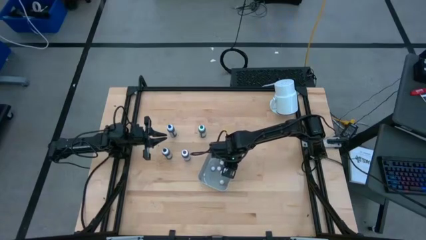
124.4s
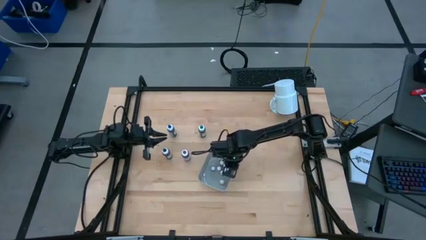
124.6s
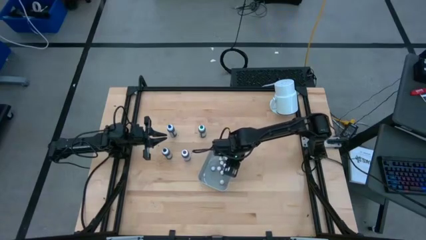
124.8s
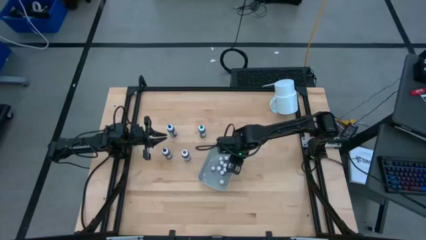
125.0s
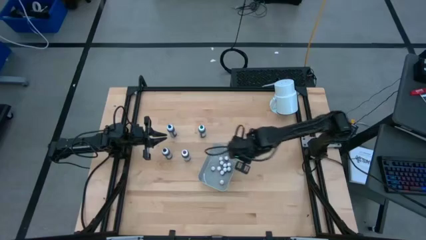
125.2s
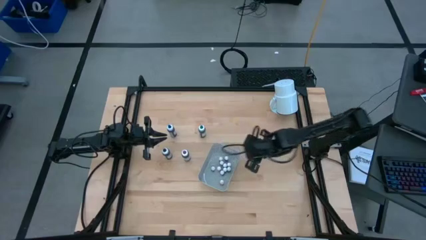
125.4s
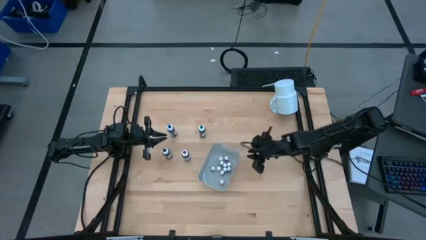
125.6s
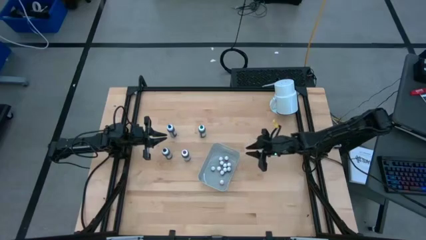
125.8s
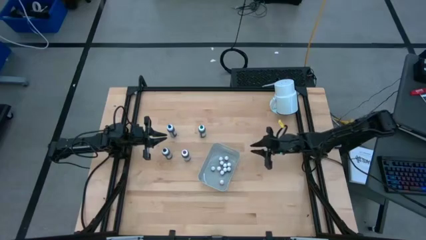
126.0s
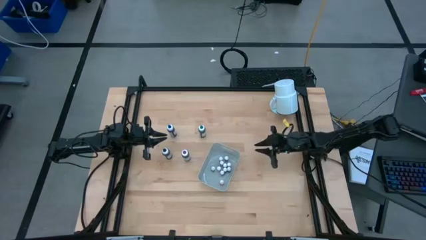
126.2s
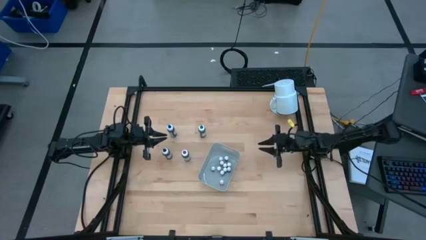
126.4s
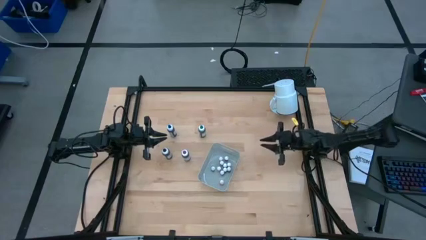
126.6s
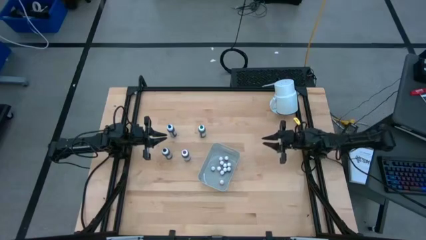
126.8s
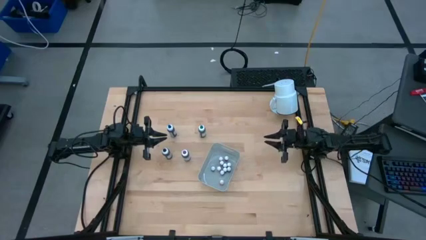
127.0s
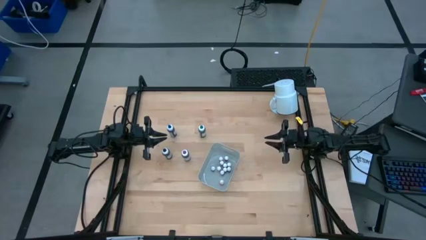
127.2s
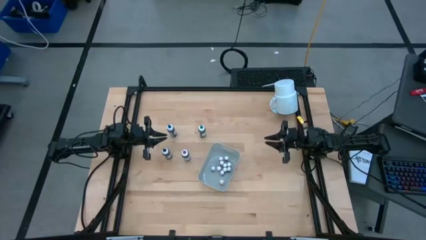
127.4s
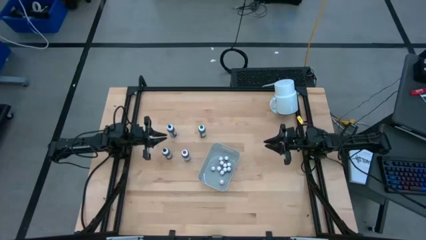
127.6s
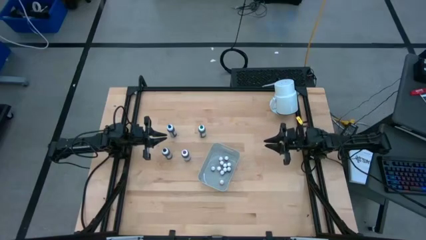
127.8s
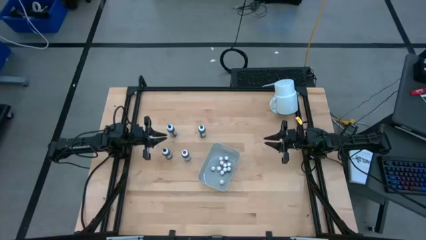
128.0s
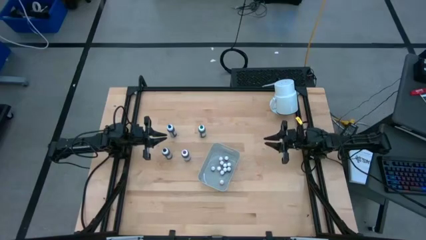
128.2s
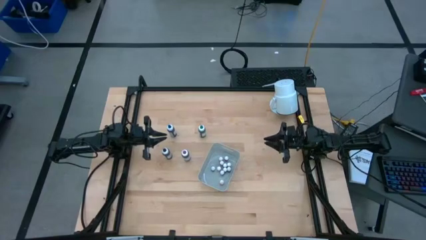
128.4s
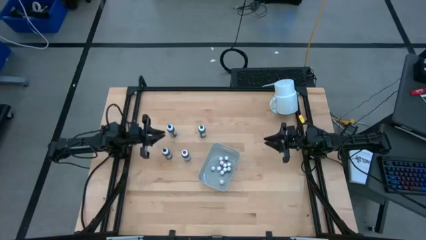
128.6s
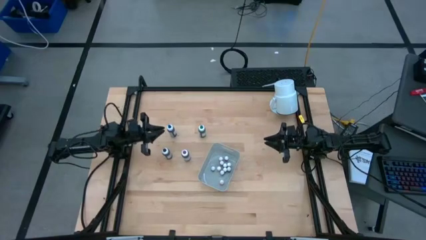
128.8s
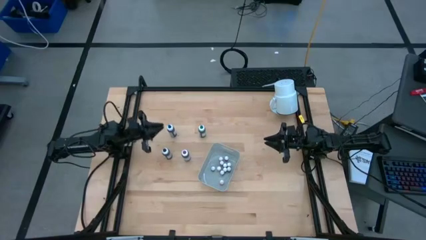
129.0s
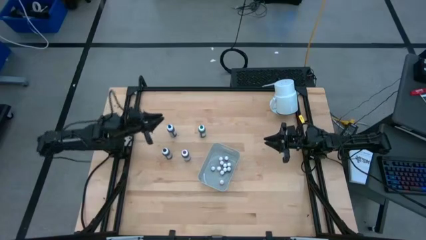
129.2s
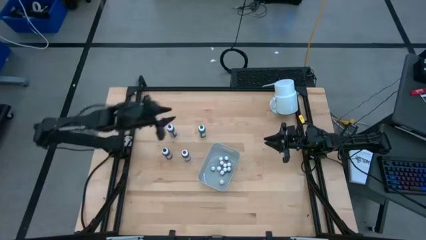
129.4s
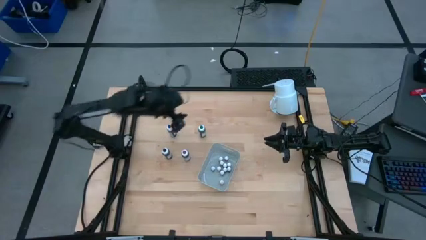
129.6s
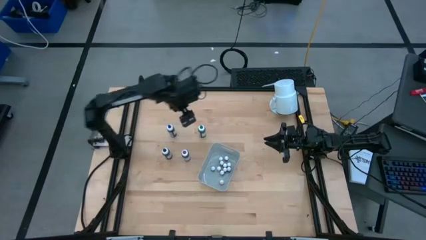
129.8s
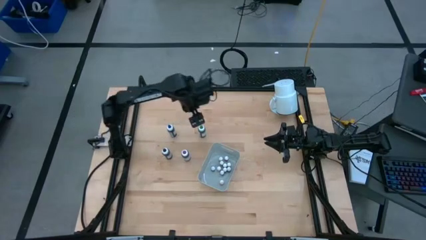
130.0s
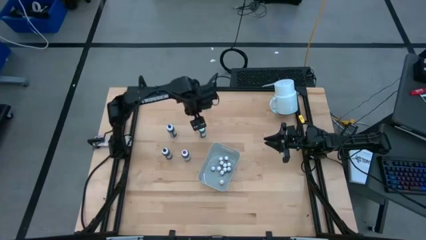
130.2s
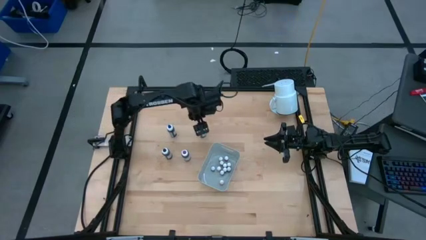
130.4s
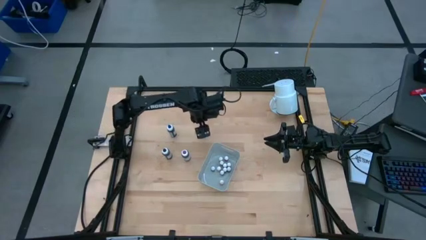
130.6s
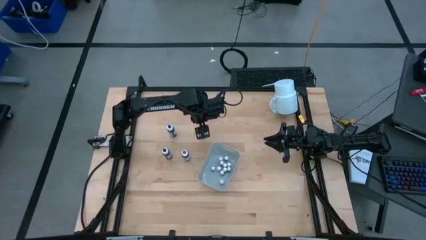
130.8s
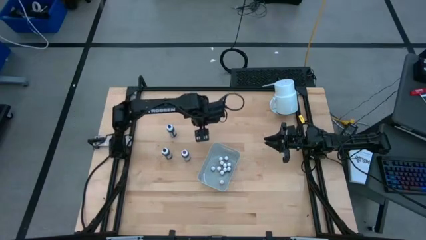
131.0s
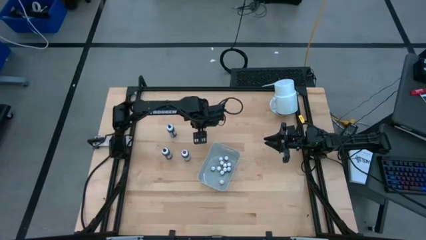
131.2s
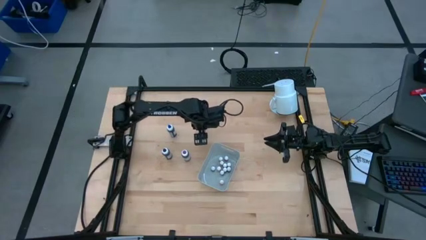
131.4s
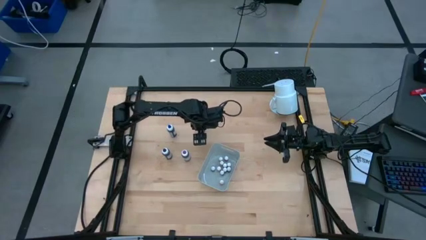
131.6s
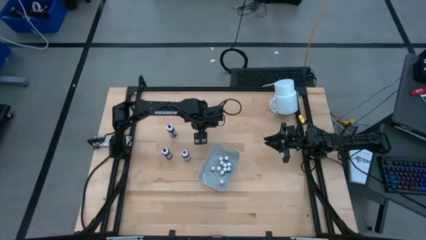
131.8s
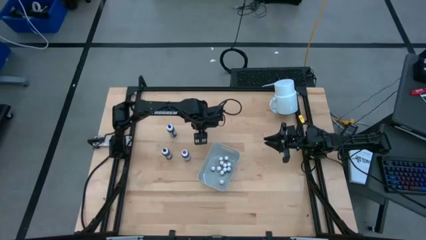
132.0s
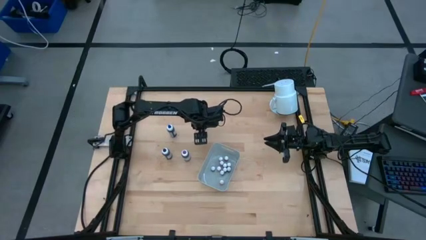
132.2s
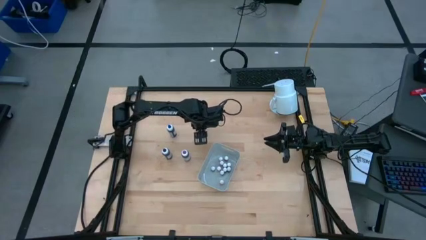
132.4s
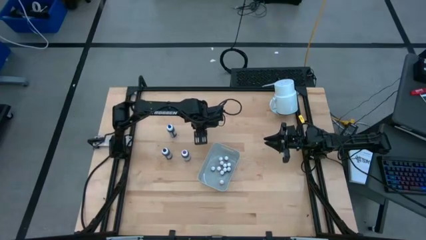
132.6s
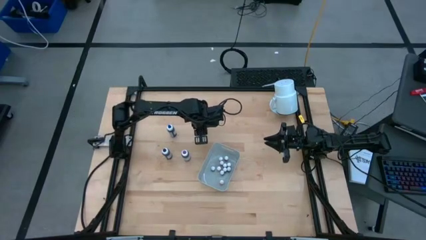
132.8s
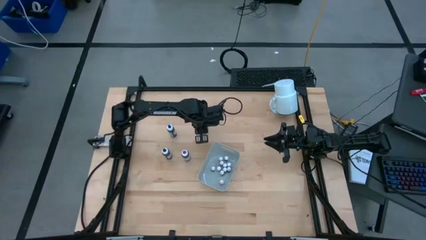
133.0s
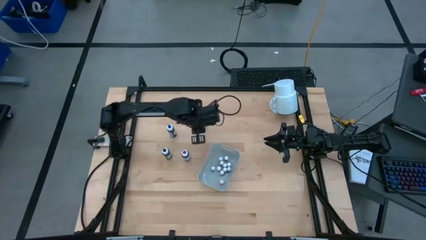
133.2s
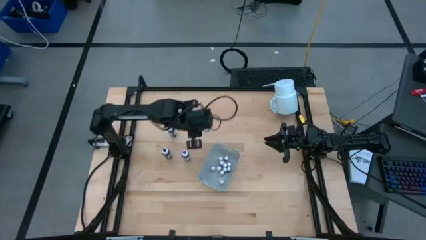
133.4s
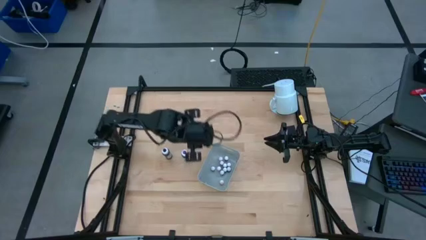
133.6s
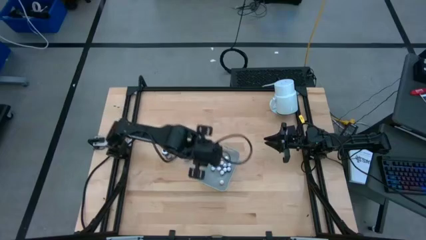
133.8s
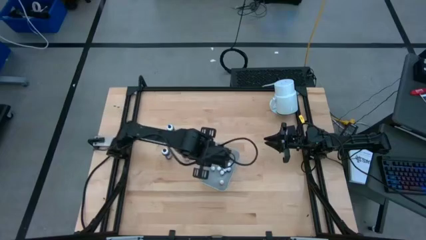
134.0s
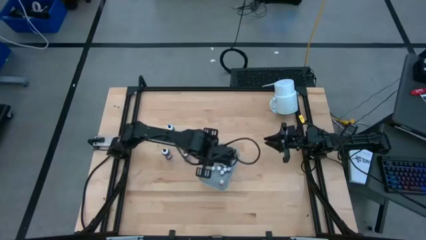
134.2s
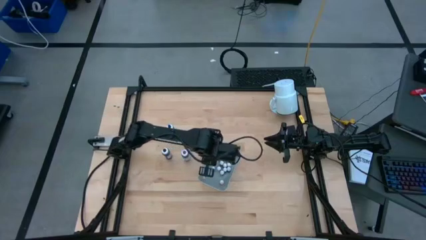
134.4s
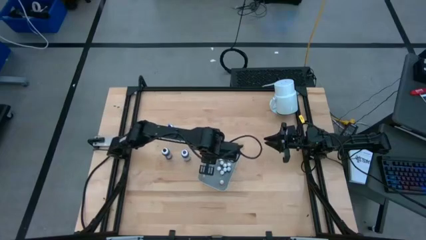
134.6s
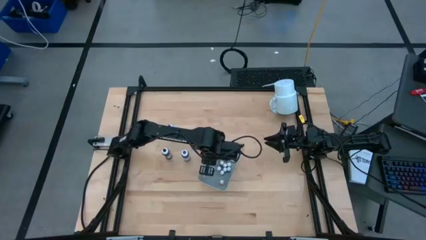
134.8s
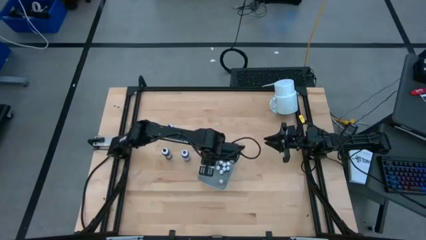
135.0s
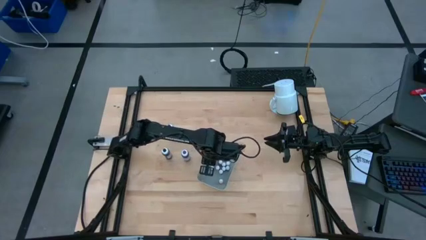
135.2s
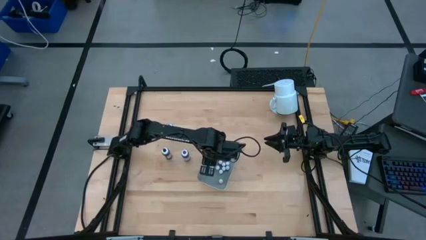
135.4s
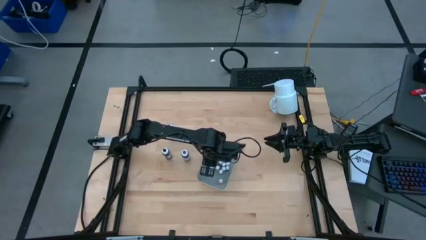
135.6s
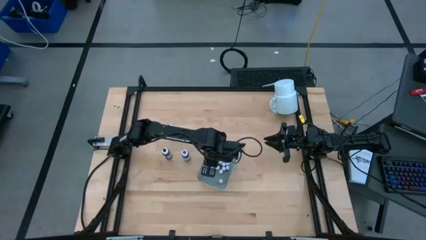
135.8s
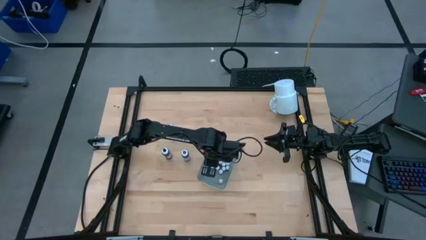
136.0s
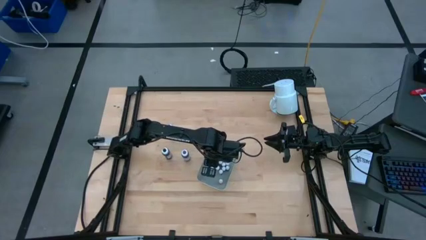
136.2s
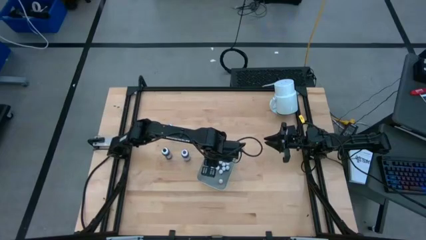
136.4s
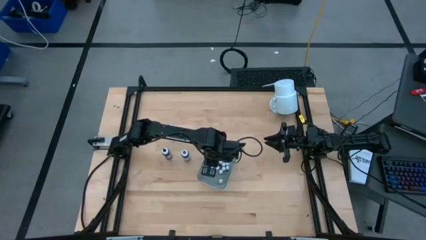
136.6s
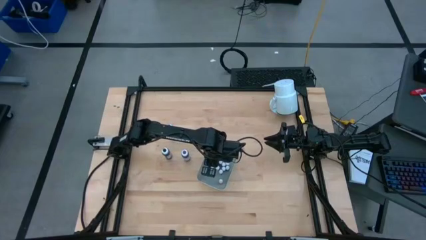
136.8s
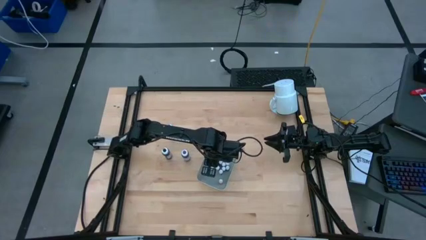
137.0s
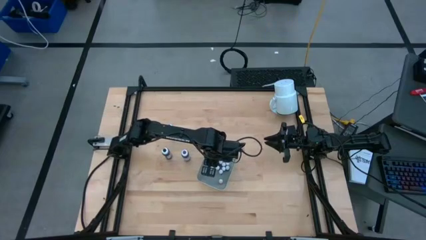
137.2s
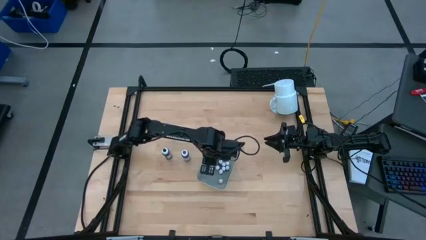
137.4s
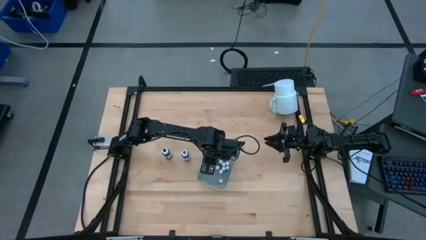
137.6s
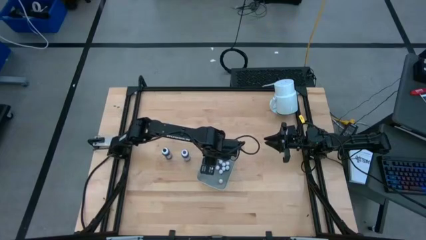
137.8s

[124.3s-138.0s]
Task: Pick & Place food coloring
Put the large green food coloring bottle into the white bin

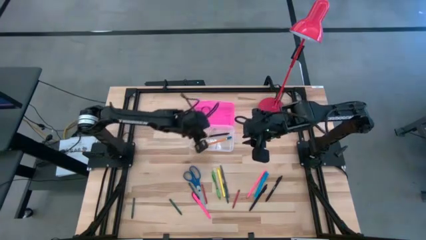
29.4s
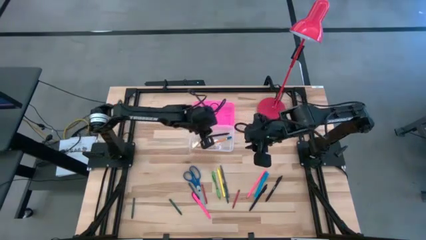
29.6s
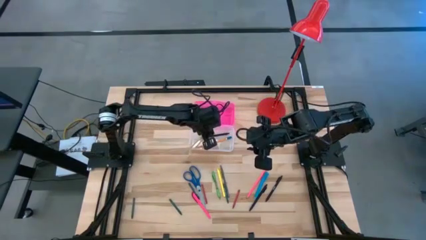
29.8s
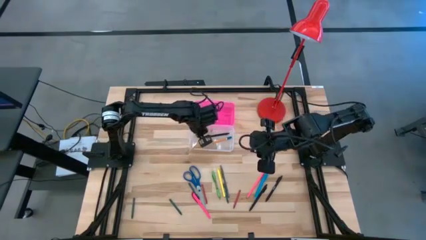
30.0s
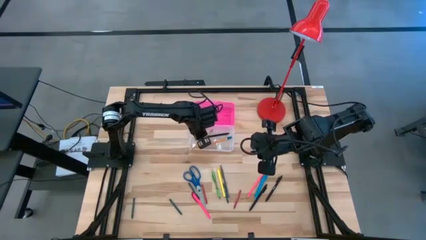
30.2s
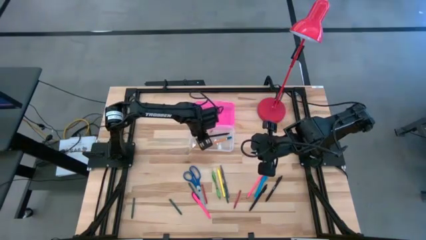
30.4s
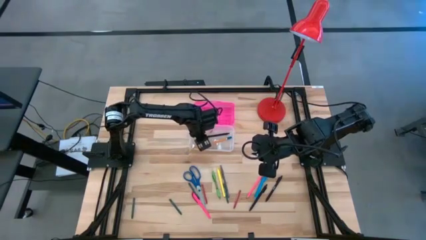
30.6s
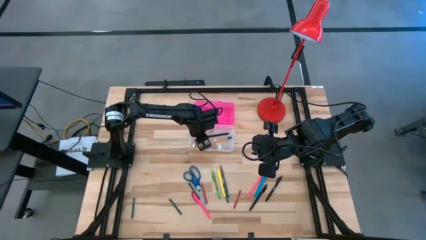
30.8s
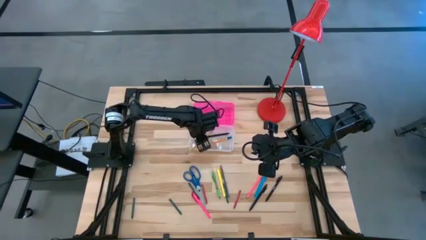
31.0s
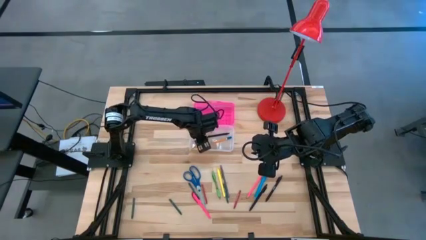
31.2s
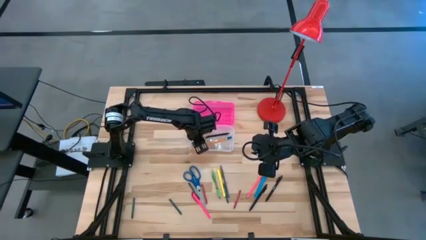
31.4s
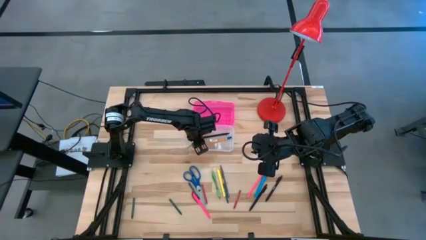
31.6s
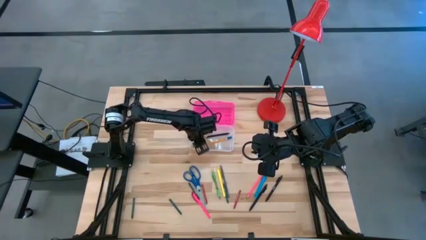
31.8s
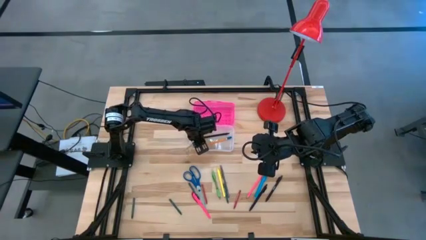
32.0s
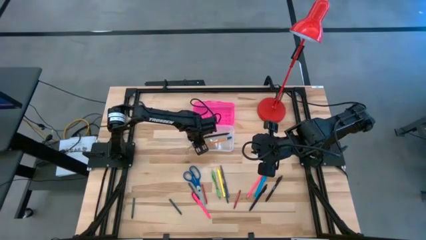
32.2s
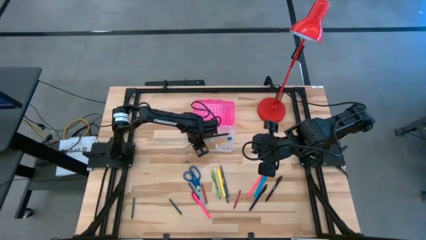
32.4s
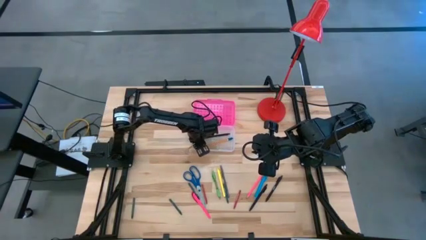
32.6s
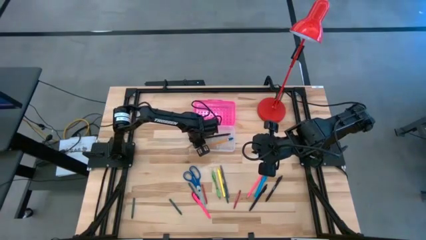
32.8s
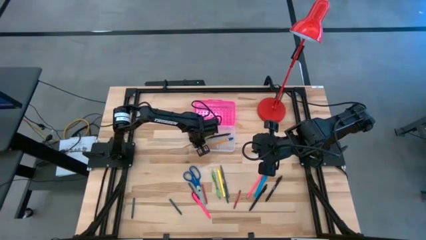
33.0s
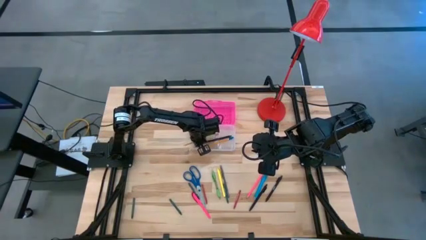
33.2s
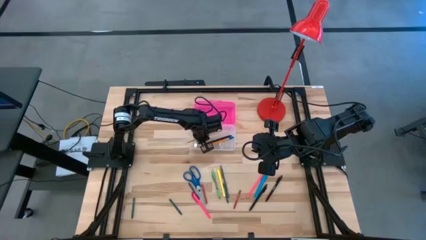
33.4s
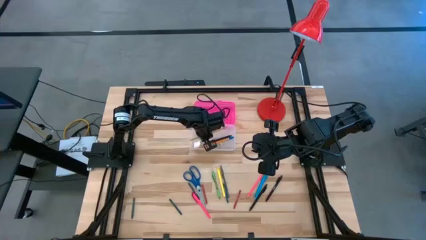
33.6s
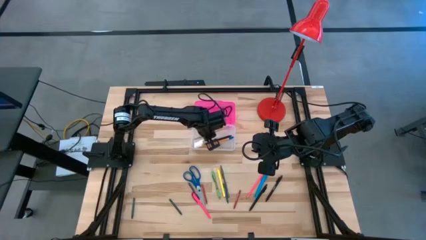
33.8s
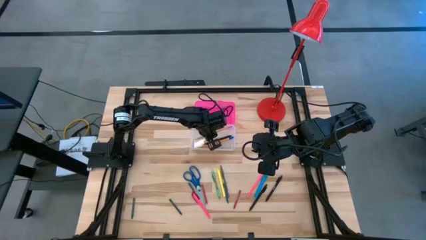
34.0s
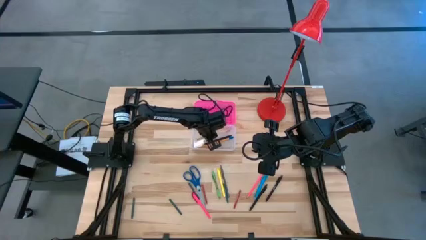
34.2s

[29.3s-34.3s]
Task: Pick & place school supplies into a supply box
Put the yellow pencil into the pink supply box
